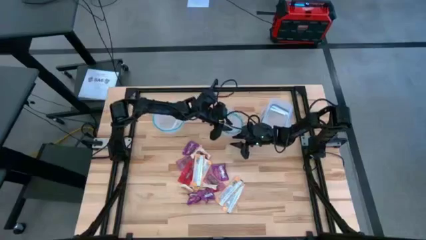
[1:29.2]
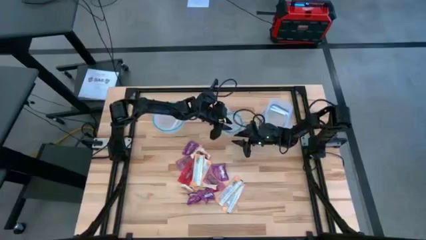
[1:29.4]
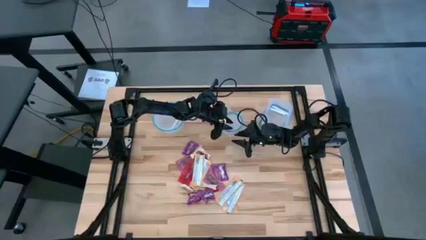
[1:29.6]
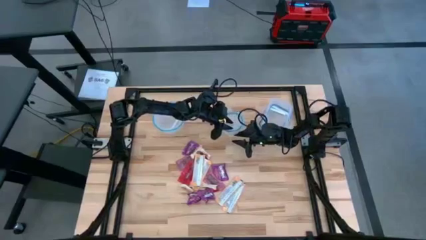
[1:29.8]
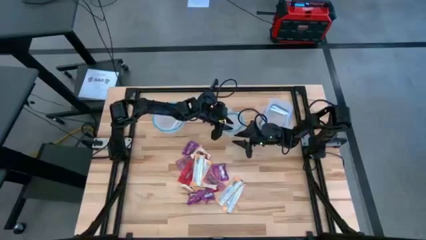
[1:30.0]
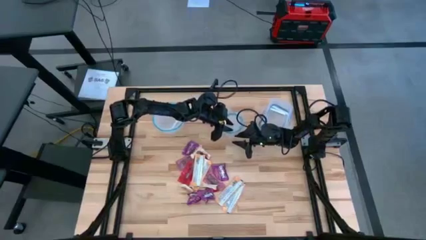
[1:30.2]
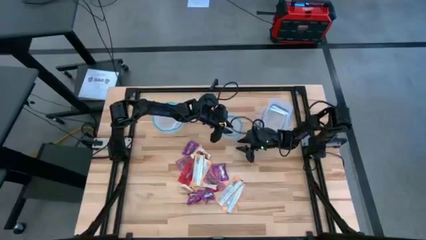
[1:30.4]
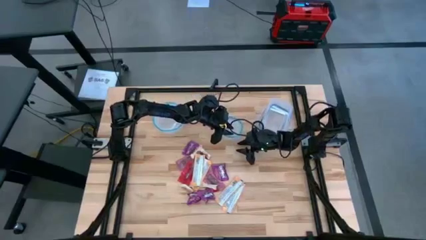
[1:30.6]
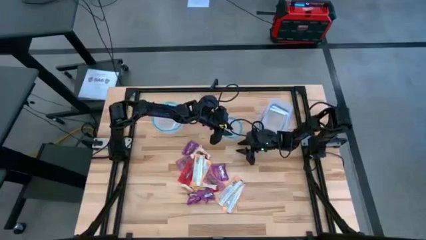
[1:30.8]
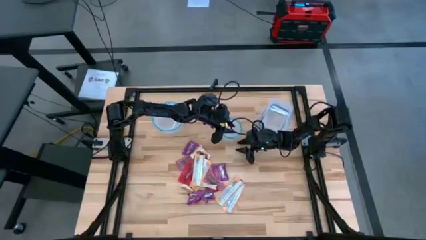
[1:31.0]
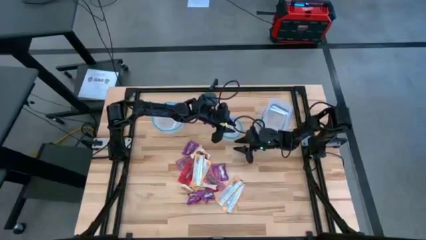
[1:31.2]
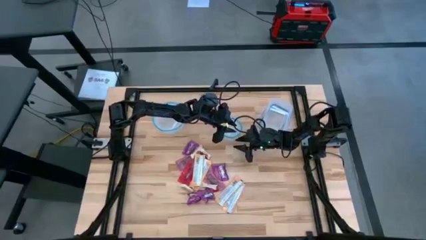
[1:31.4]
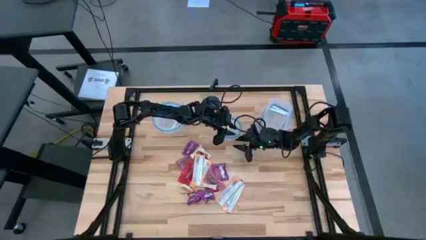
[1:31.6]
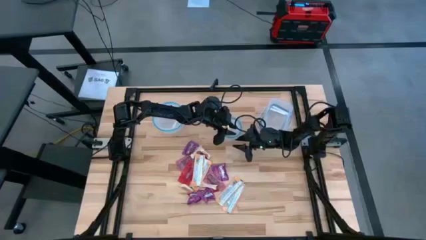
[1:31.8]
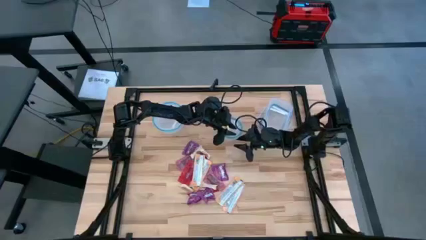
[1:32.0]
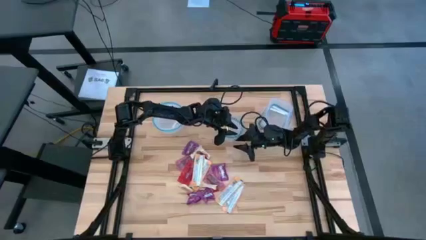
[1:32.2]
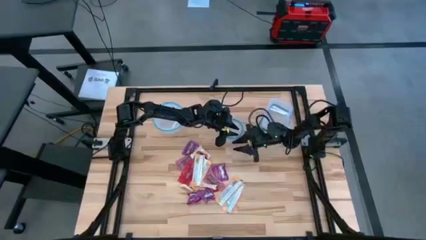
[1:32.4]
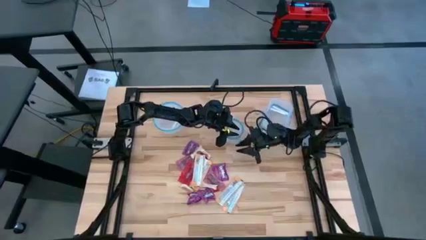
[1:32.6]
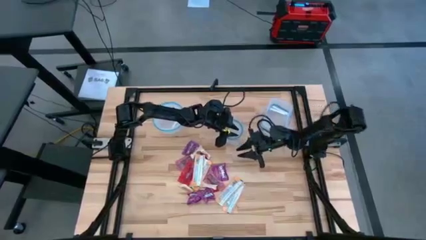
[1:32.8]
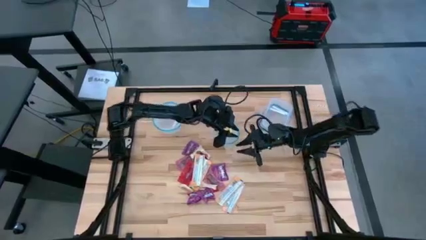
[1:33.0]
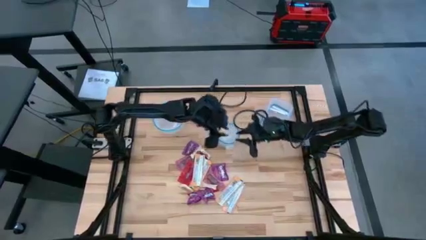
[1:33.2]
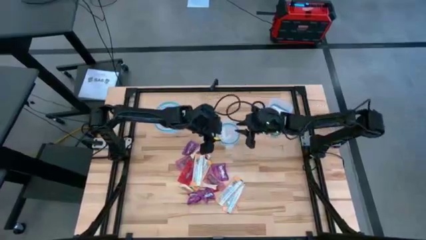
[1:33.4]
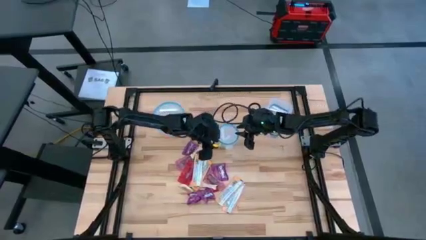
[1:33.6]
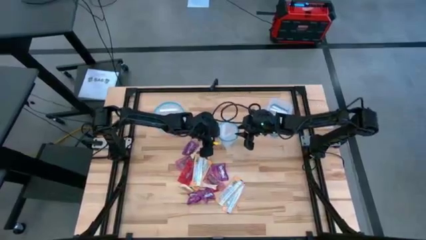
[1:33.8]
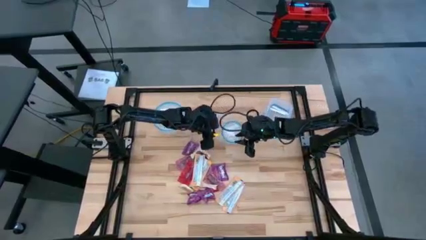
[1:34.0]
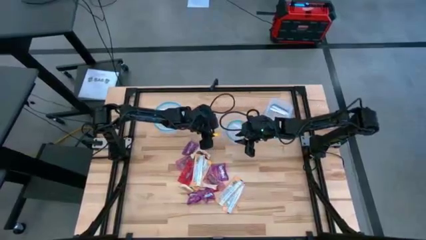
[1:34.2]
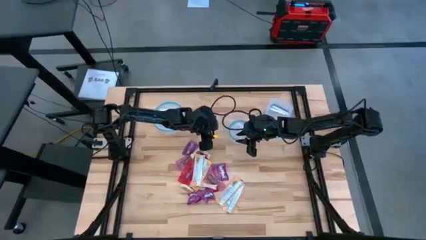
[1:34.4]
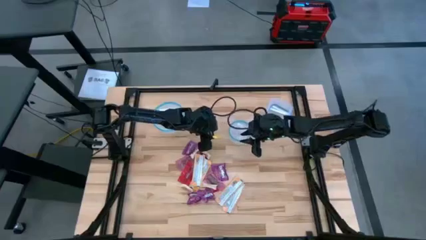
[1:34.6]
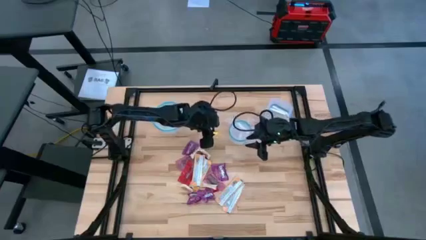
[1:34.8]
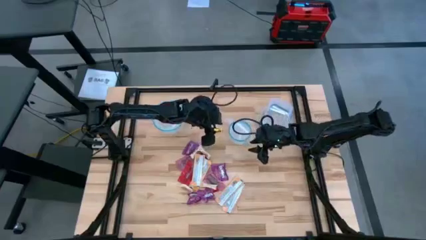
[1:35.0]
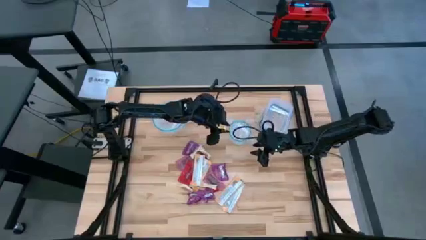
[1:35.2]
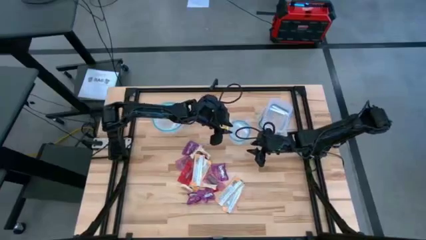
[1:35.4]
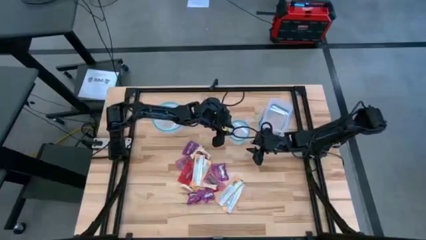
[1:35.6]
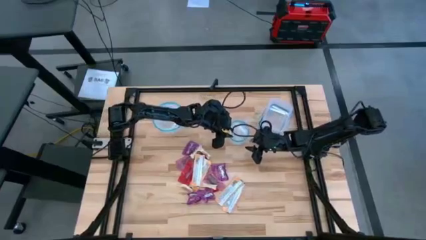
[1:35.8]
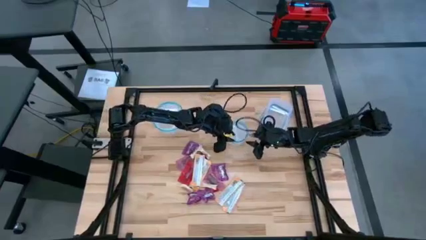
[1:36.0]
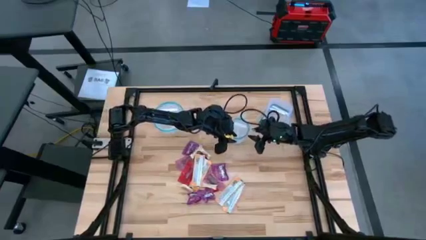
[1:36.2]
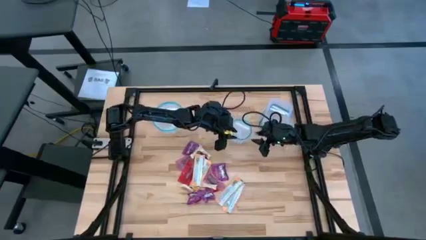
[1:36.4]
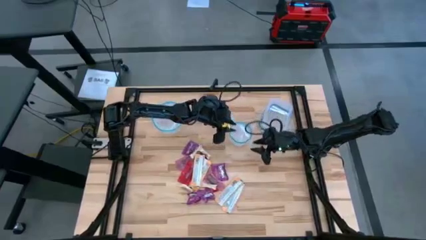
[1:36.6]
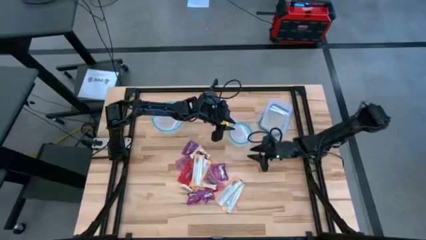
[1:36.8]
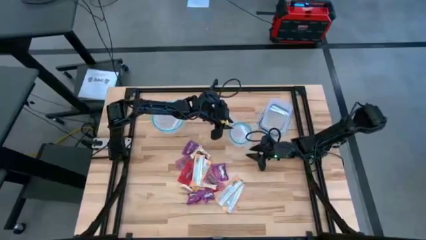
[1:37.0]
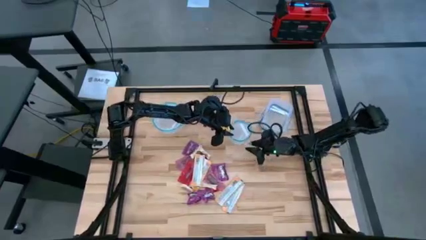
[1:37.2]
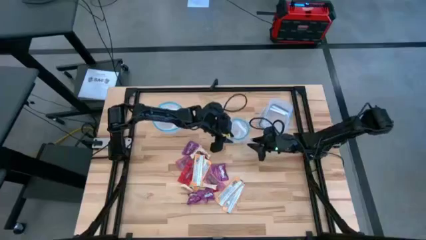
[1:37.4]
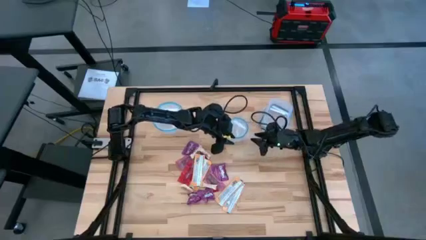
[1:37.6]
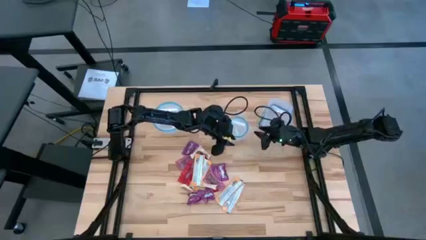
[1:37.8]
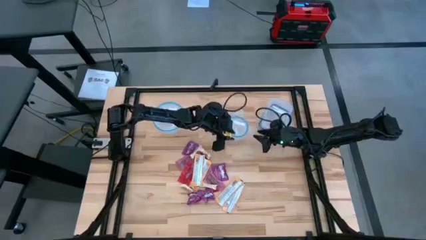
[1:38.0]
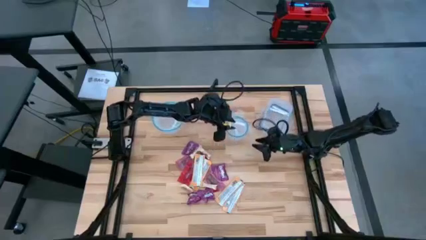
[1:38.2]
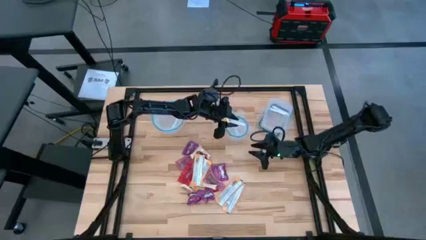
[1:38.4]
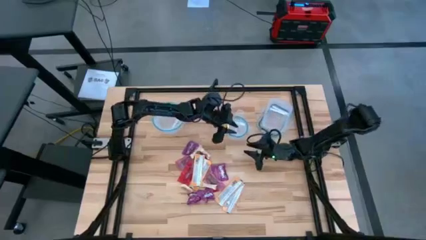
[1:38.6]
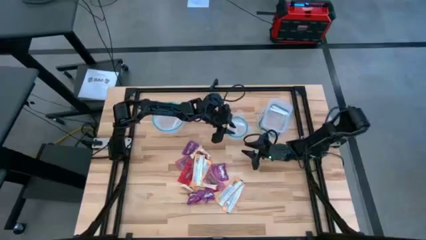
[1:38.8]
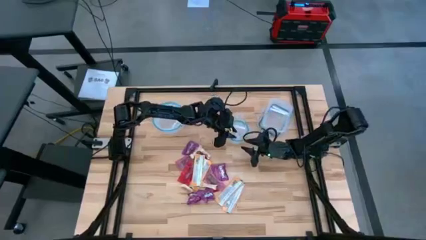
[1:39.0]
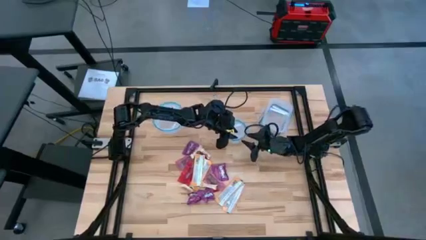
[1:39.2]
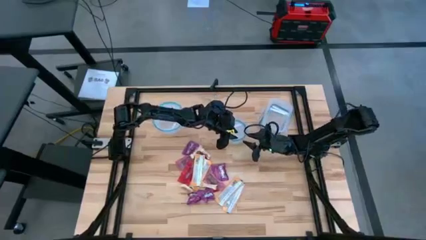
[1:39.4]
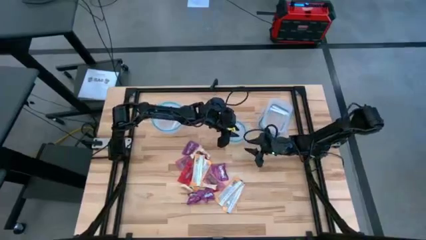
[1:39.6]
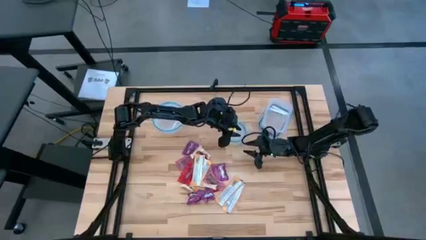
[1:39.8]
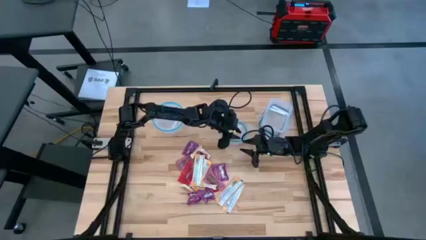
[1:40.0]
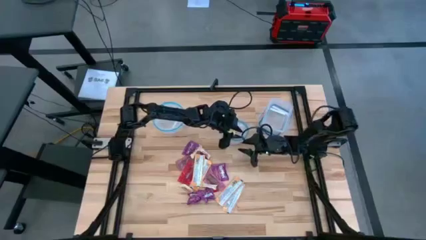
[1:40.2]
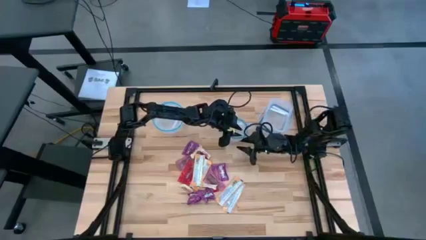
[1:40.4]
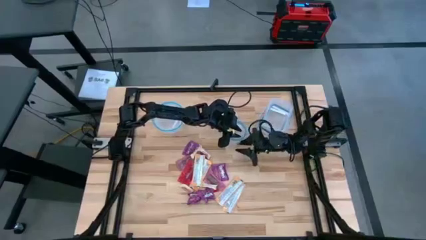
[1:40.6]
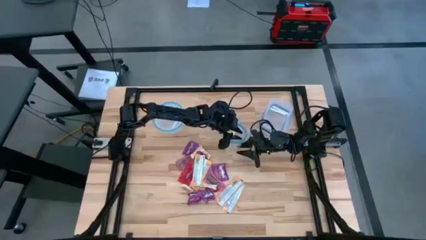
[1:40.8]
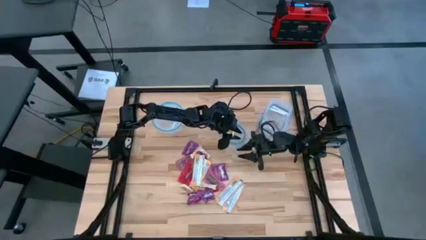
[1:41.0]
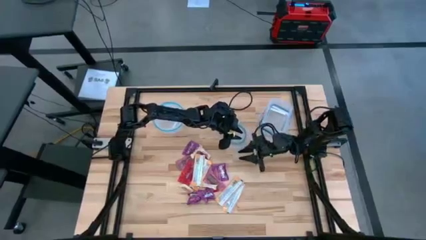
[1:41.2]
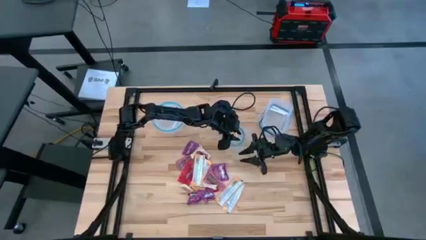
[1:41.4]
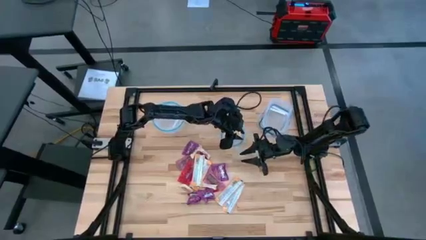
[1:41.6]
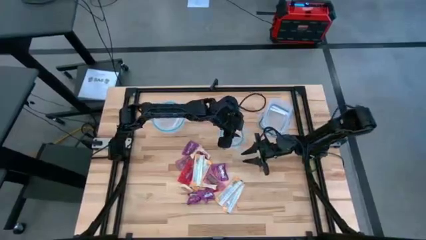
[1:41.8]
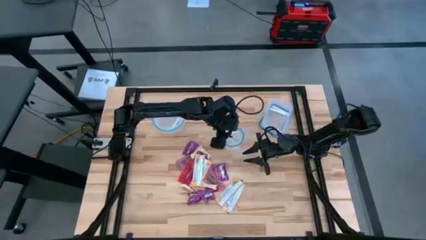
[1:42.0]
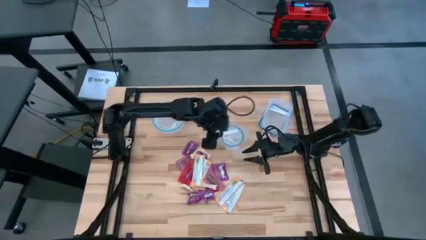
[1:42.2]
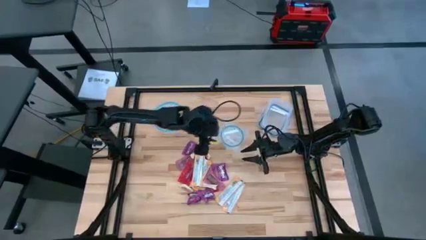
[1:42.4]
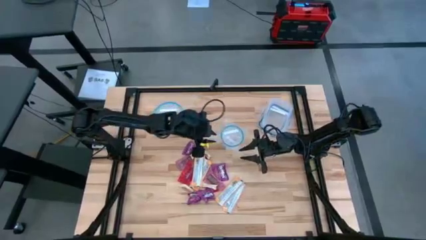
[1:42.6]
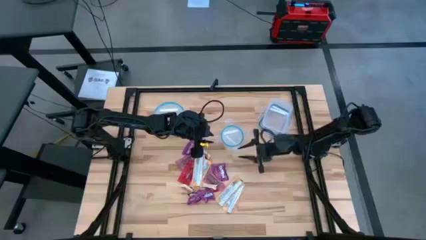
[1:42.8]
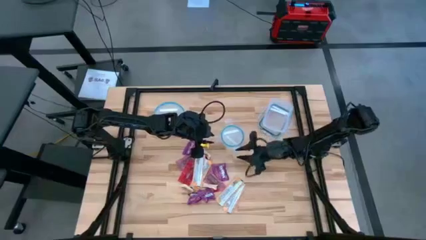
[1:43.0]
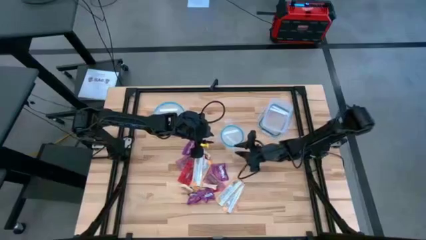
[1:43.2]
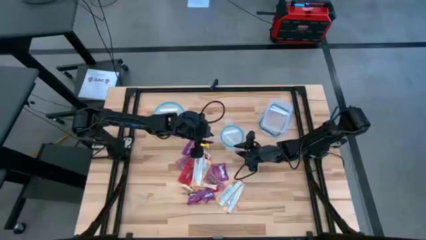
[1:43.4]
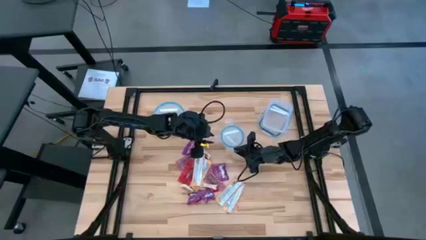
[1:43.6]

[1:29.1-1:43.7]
Task: Sort candy
Open the small round transparent bin

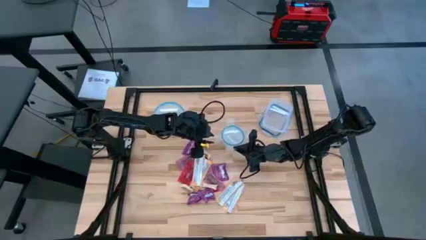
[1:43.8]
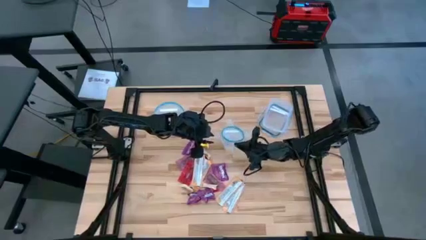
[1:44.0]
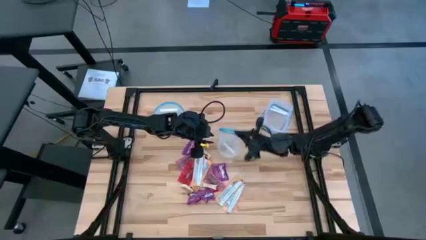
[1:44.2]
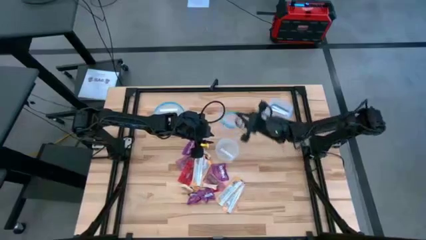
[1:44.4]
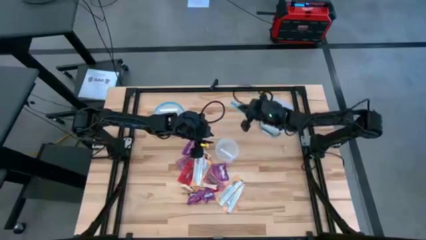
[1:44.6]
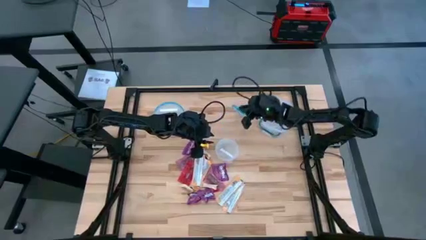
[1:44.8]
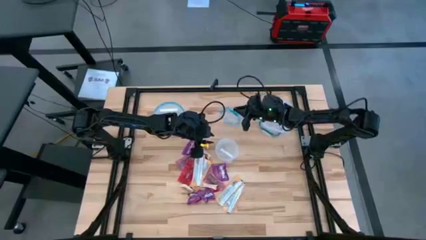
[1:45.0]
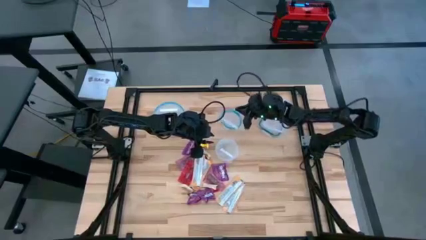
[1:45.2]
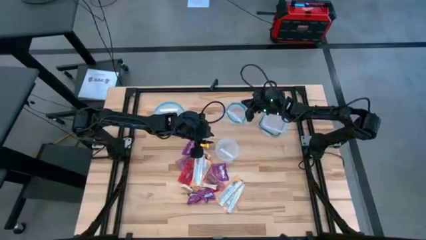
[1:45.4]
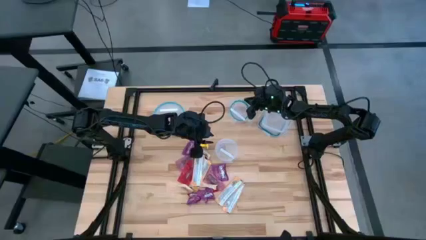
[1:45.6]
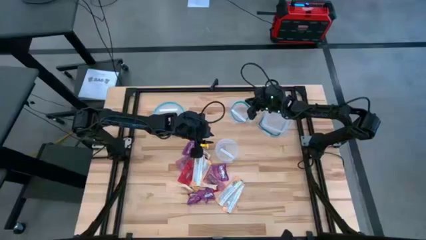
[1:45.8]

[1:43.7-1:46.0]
Remove the small round transparent bin's lid
